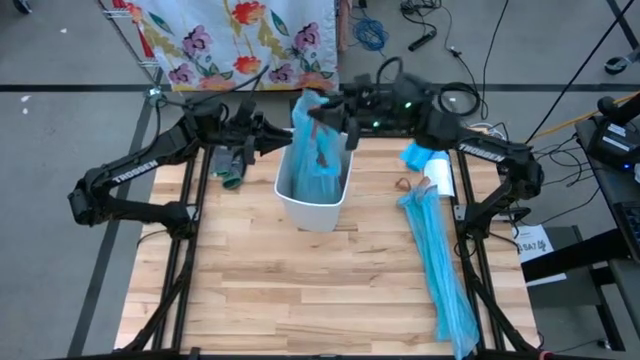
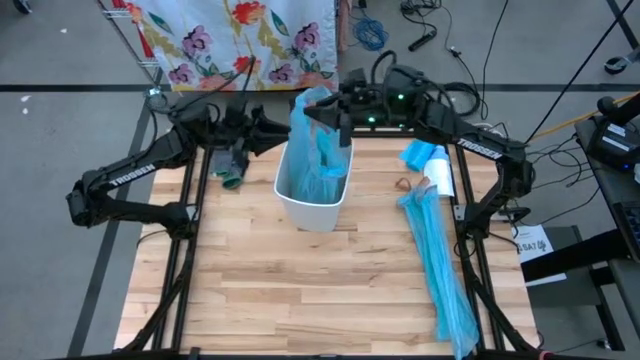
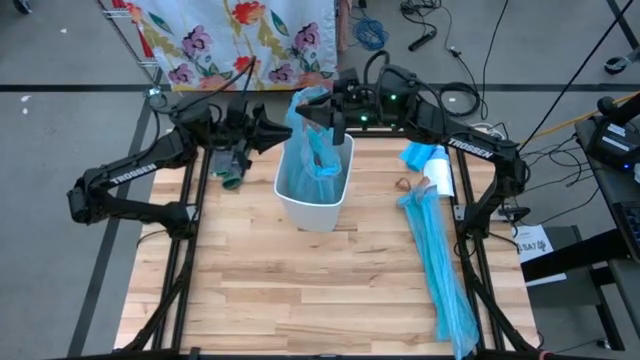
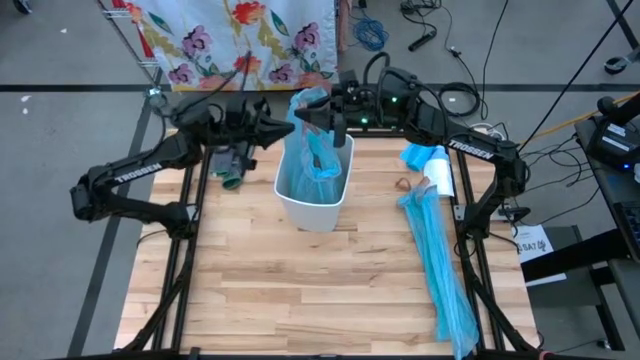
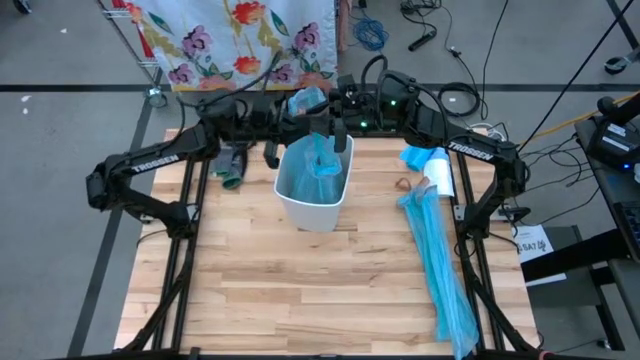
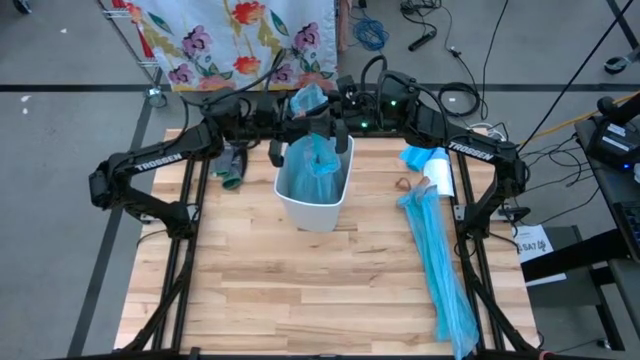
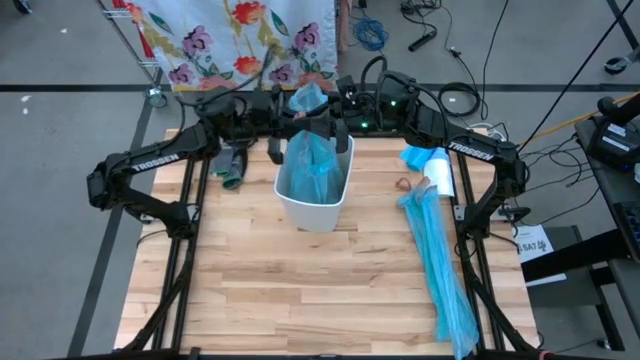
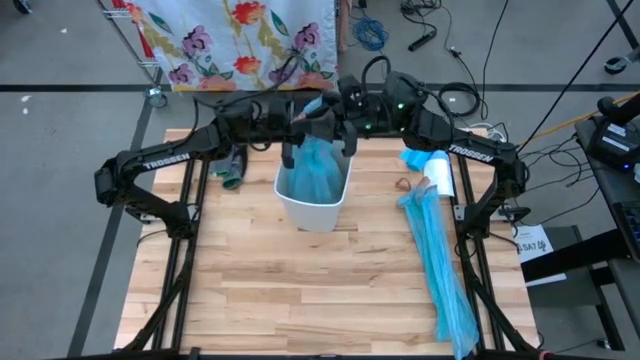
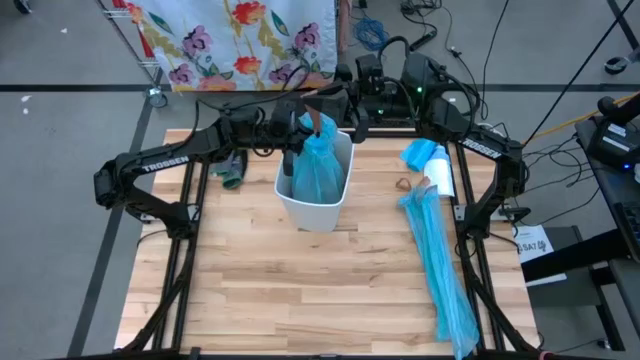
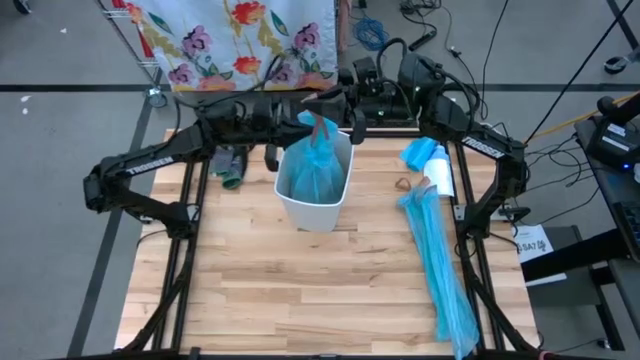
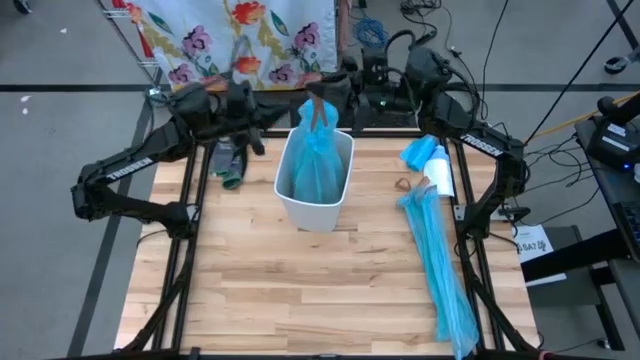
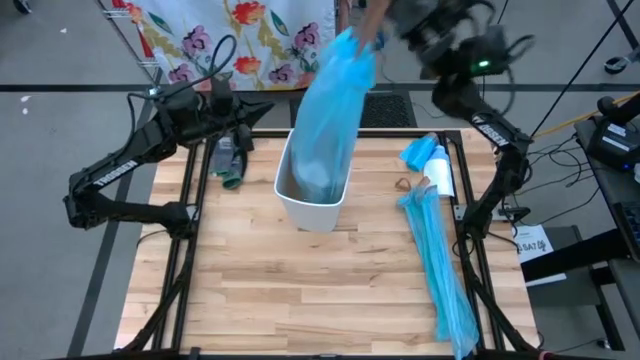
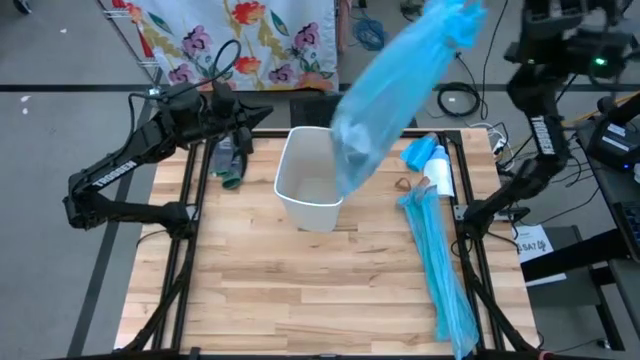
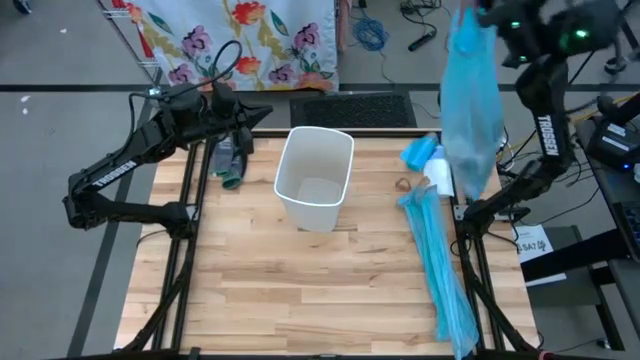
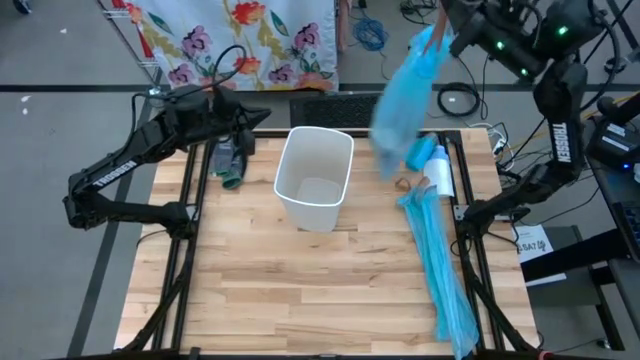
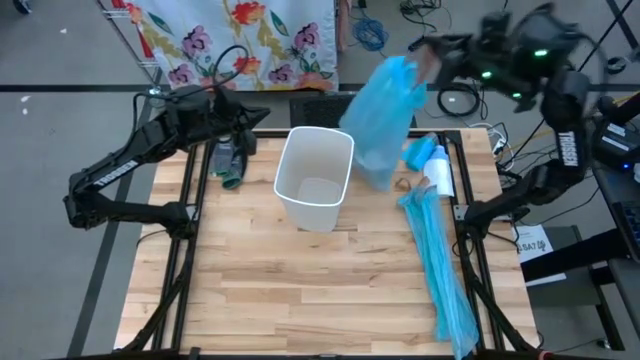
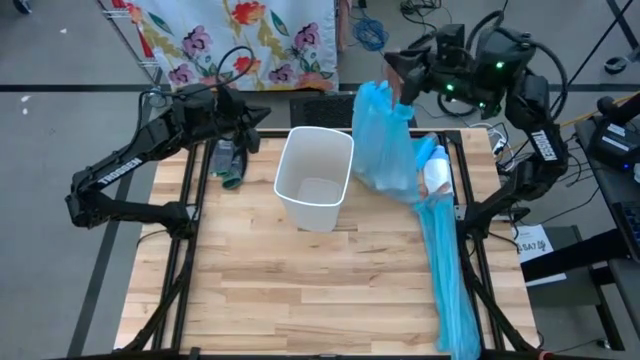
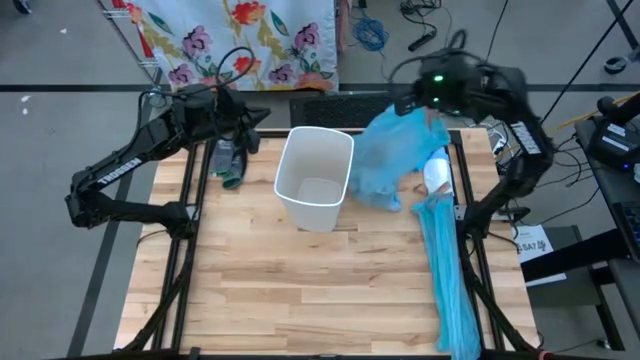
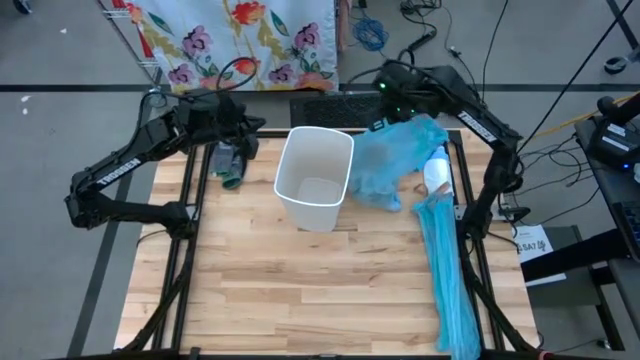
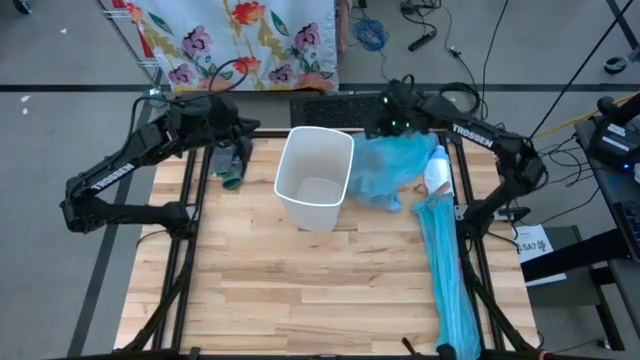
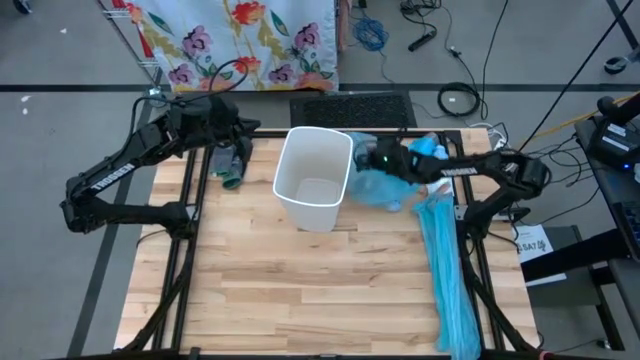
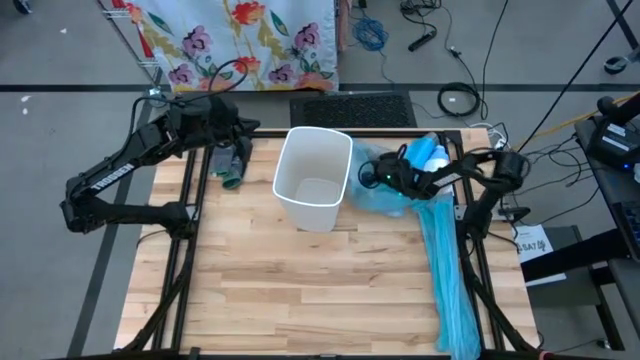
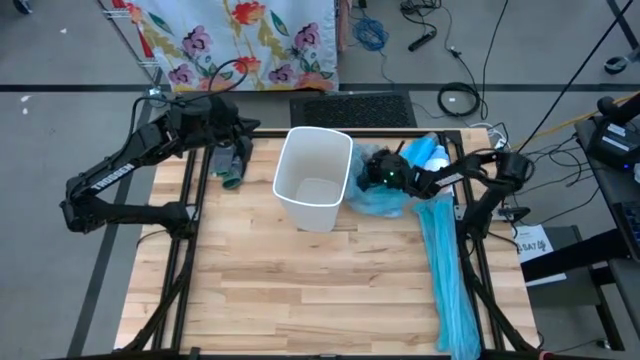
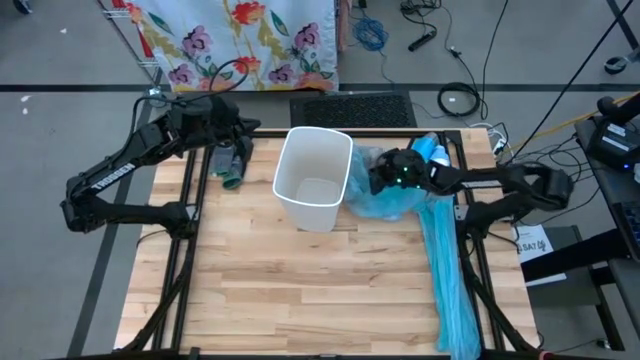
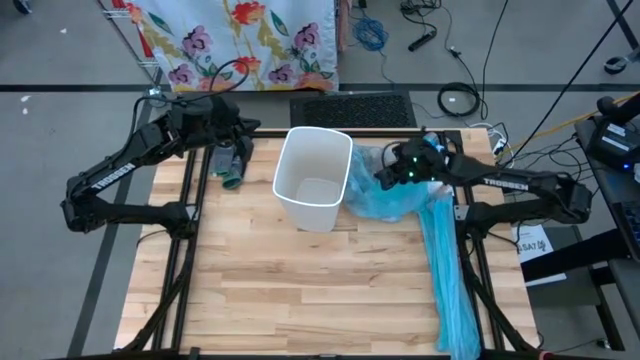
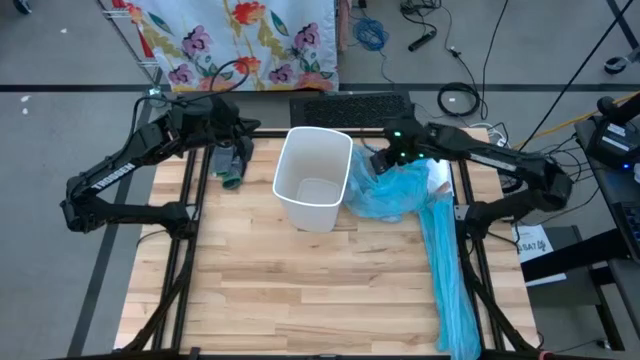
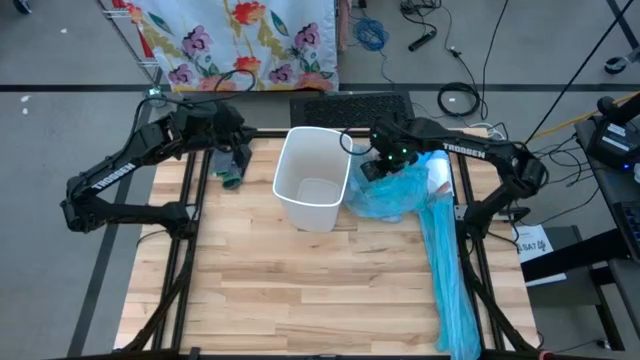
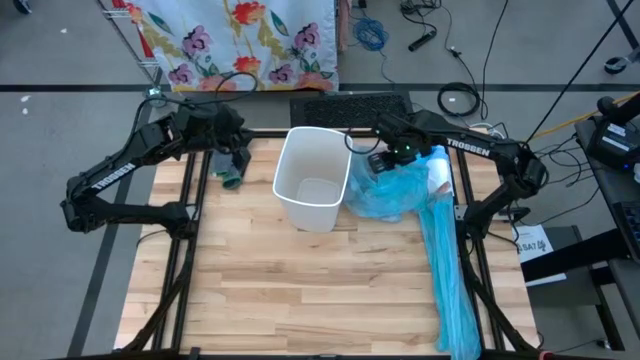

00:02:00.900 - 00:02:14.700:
Task: place trash/remove bag and relplace
Remove the blue trash bag from the trash bin

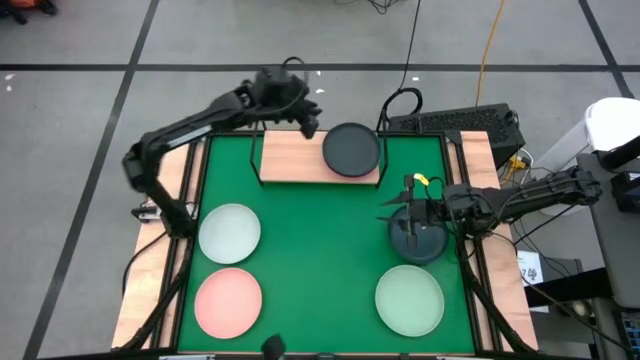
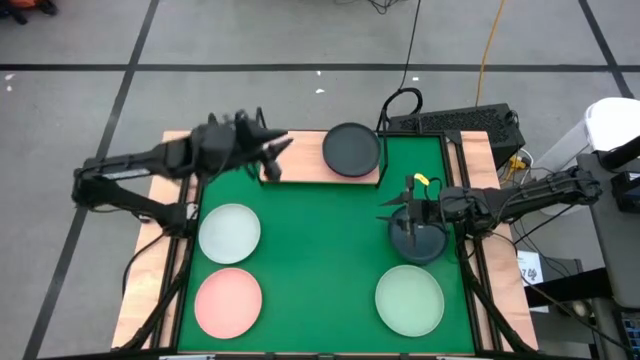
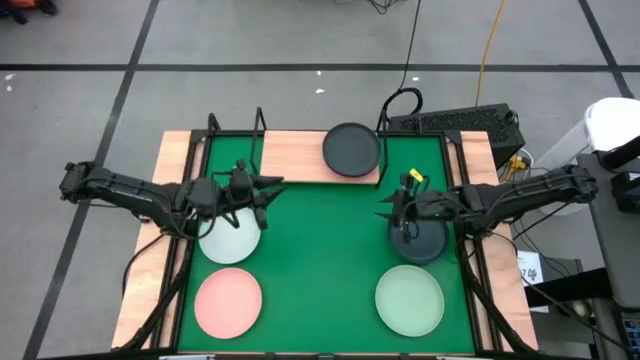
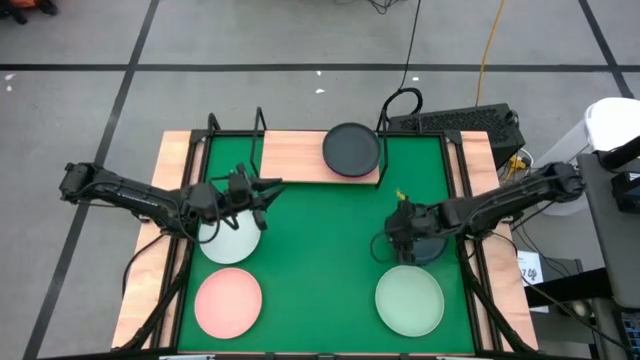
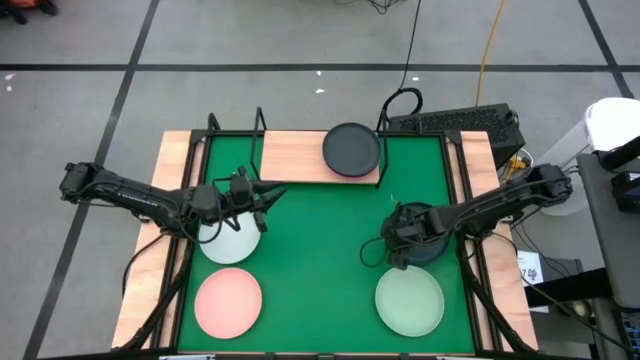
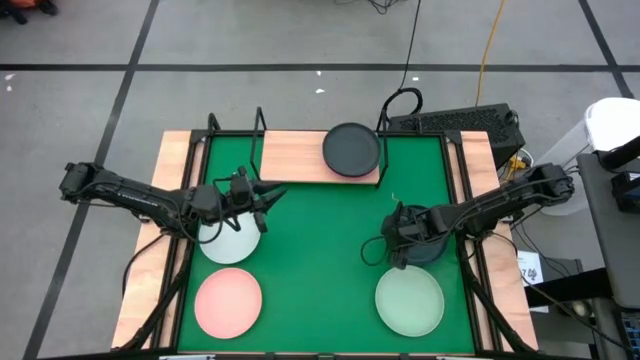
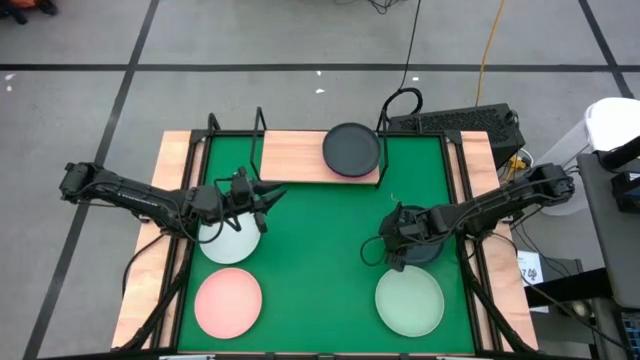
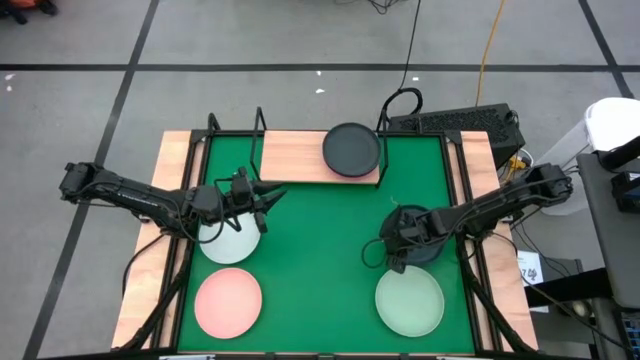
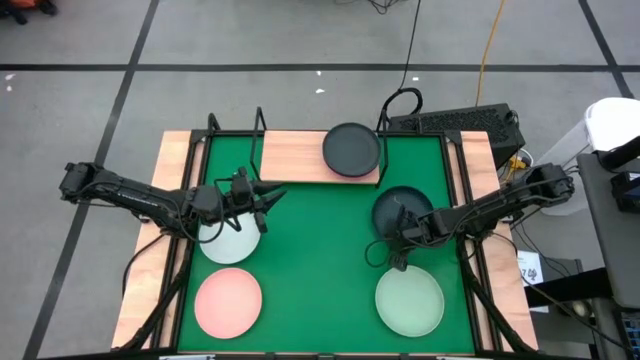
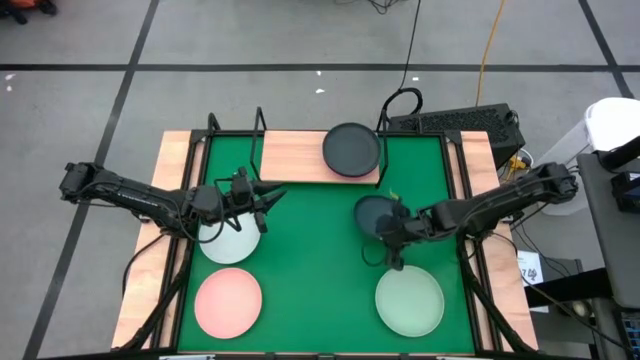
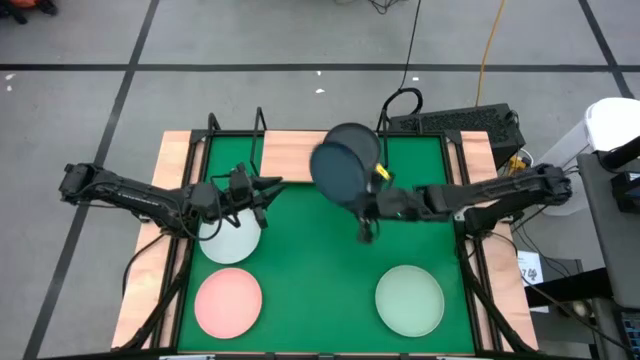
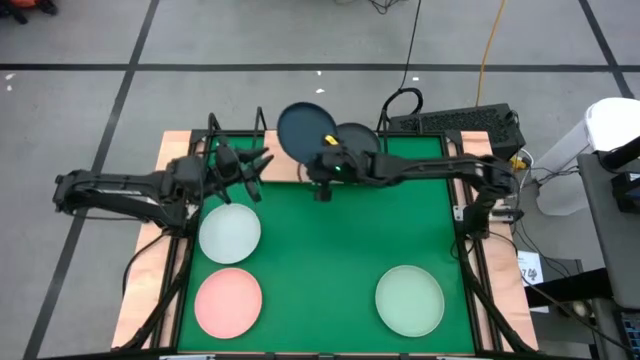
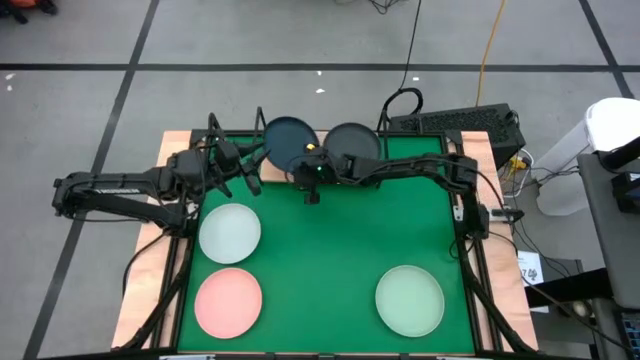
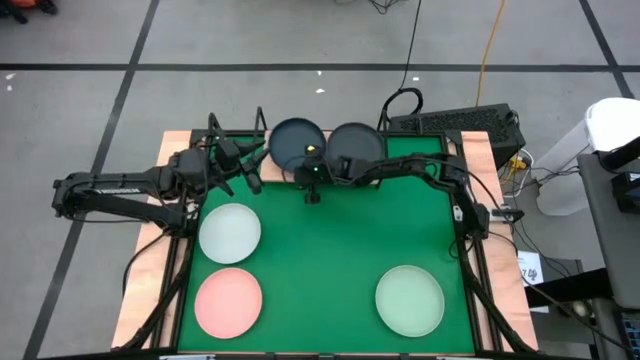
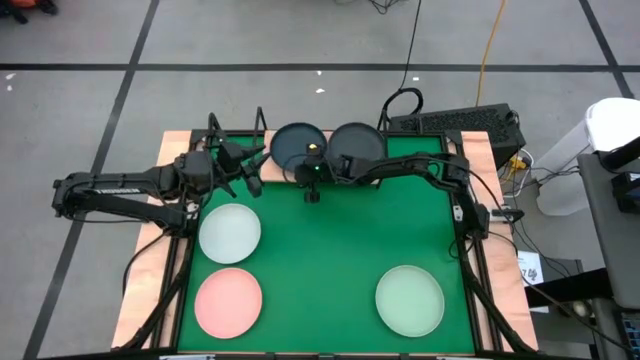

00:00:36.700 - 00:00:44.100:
Task: Place and stack plates onto a shelf
Put the dark blue plate on the shelf
